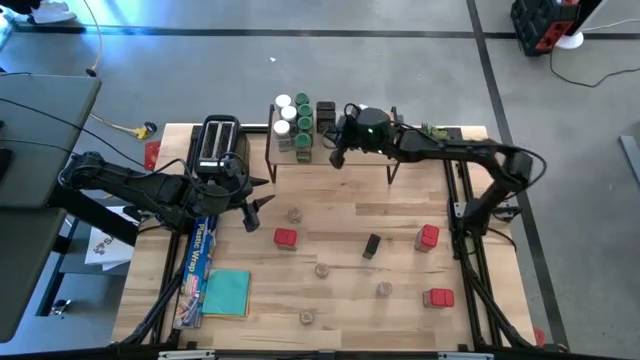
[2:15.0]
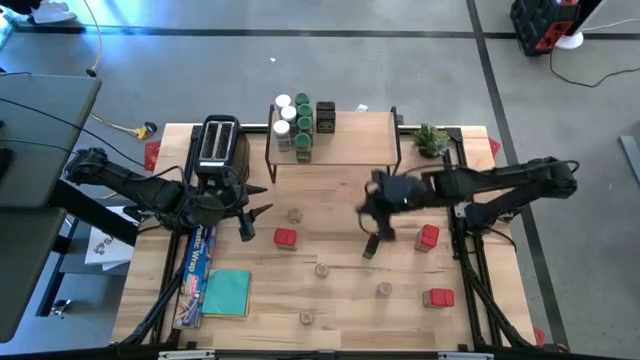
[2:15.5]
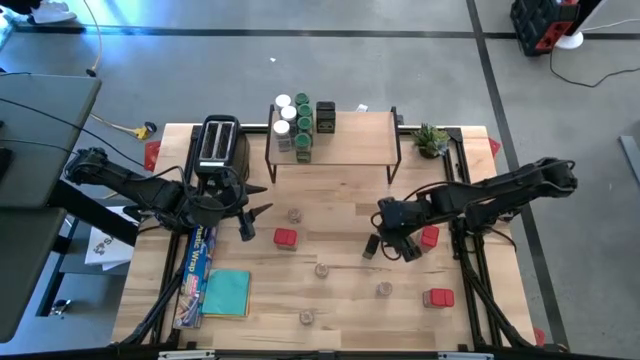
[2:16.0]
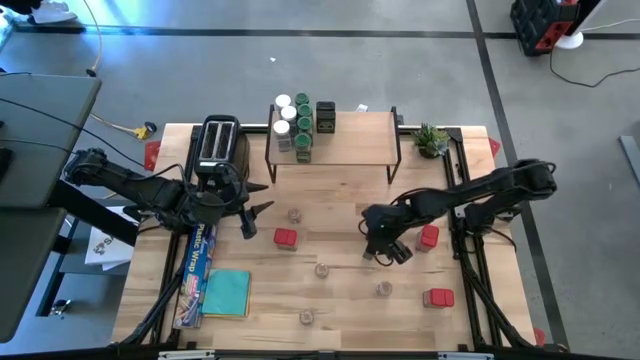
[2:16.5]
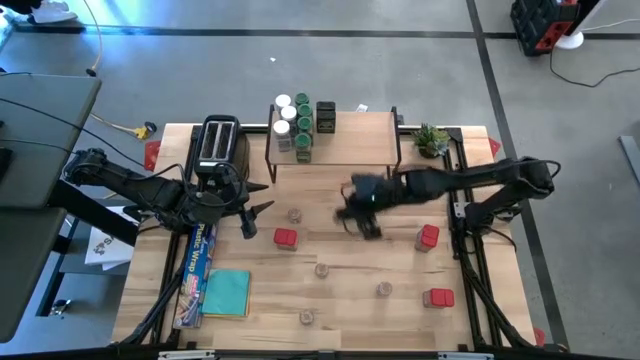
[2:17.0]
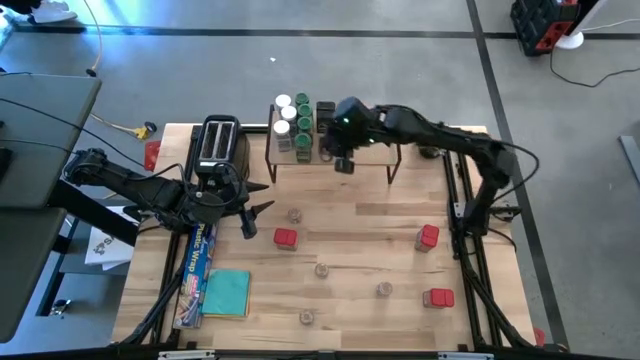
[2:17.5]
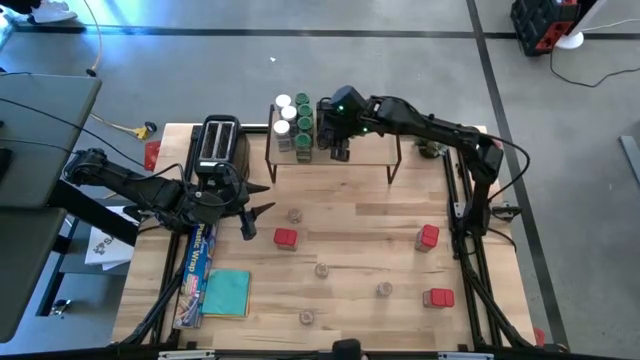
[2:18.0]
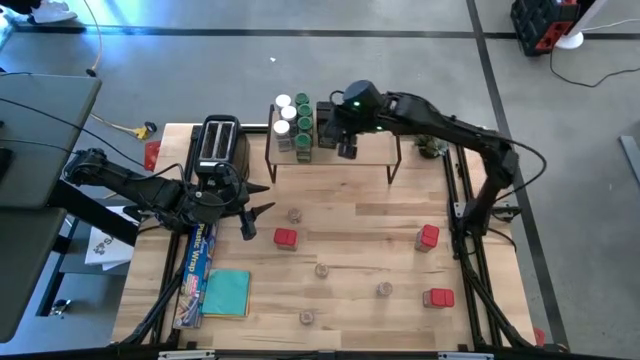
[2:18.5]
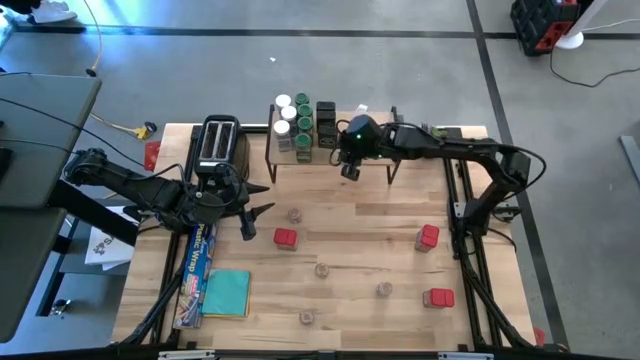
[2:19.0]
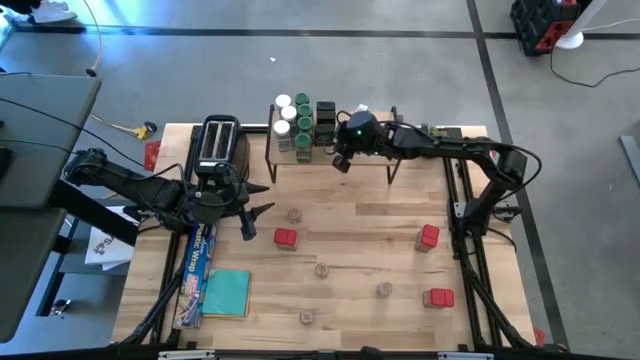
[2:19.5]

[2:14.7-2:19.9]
Task: Shelf spices
Put the black seasoning can on the shelf aligned with the other black seasoning can

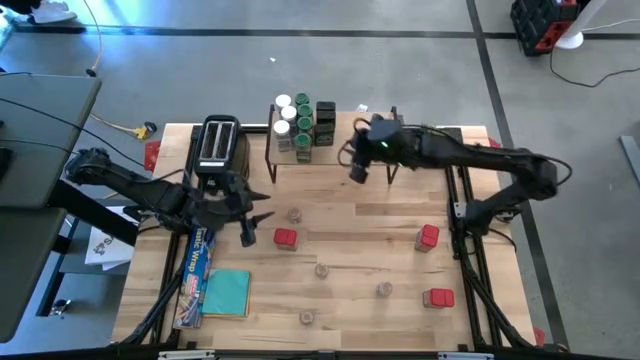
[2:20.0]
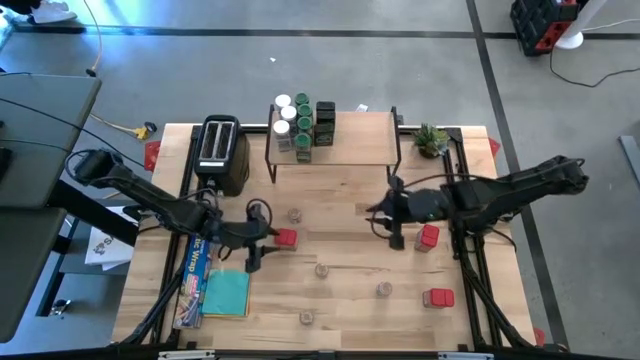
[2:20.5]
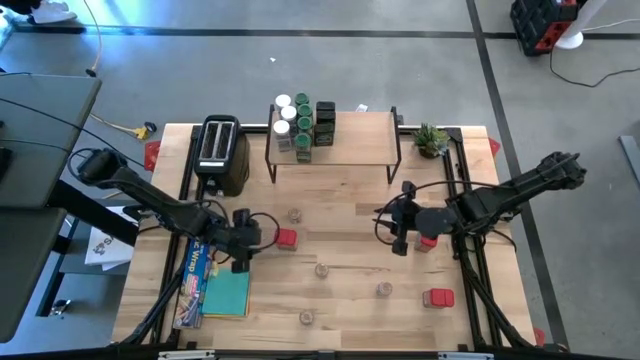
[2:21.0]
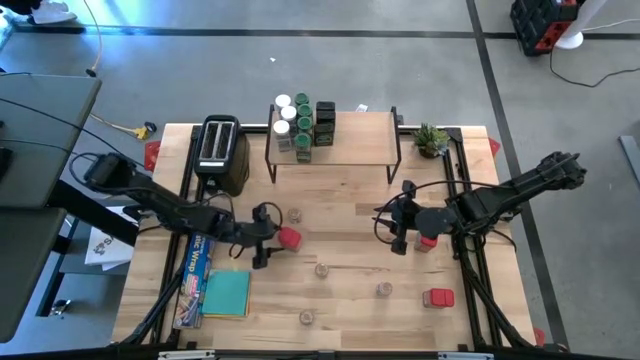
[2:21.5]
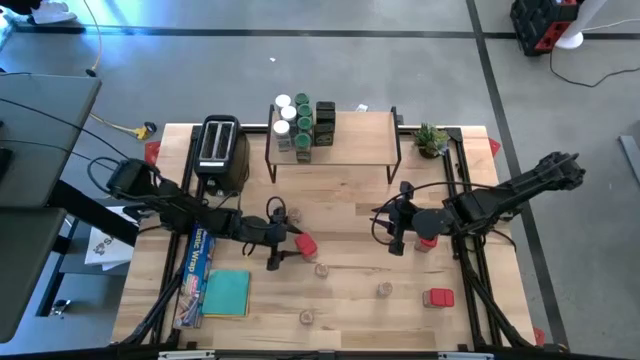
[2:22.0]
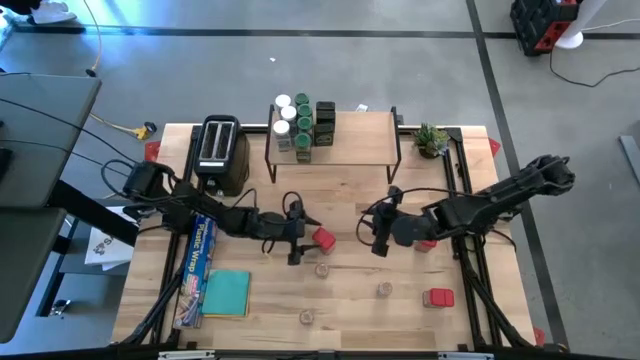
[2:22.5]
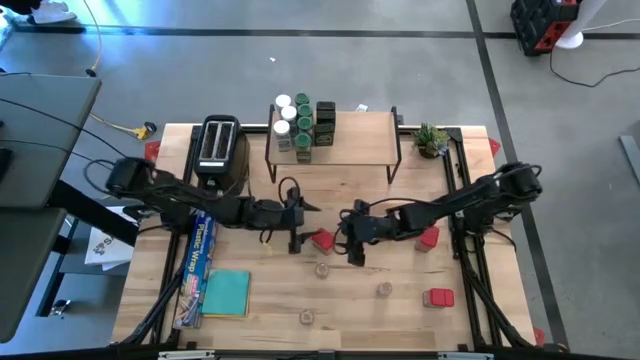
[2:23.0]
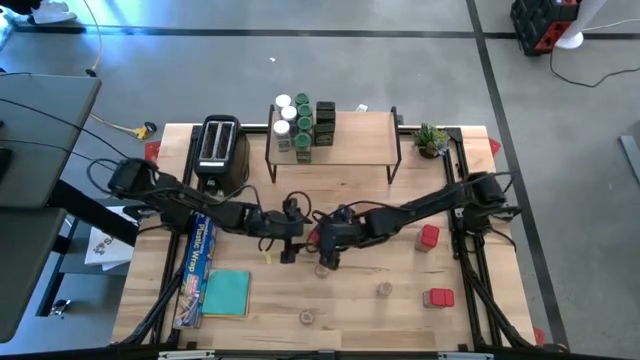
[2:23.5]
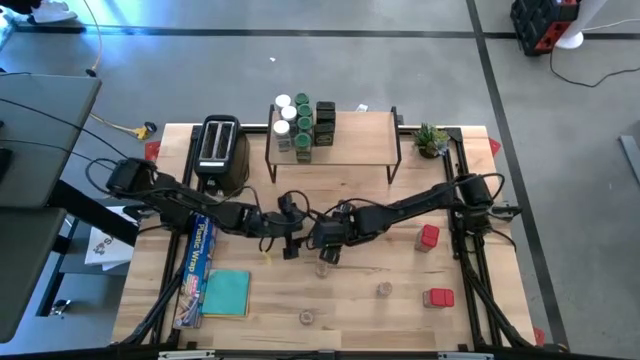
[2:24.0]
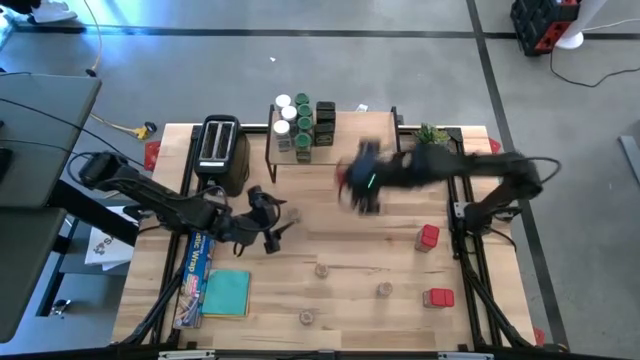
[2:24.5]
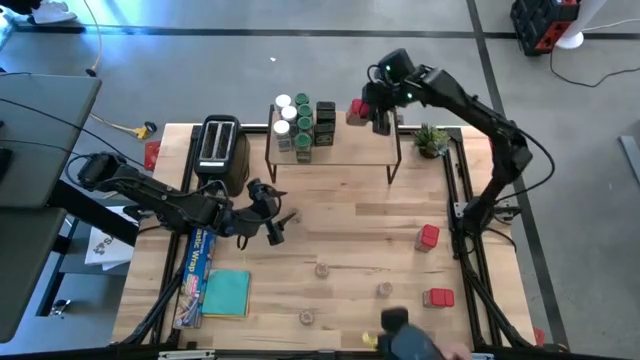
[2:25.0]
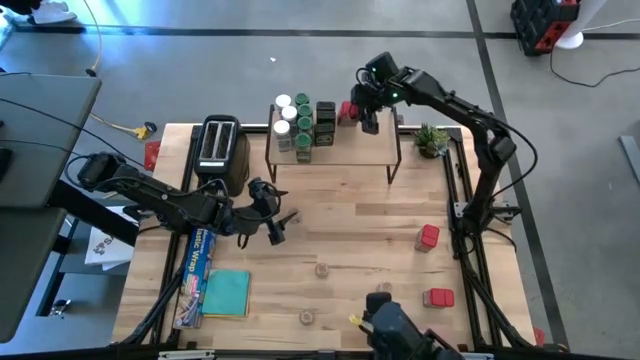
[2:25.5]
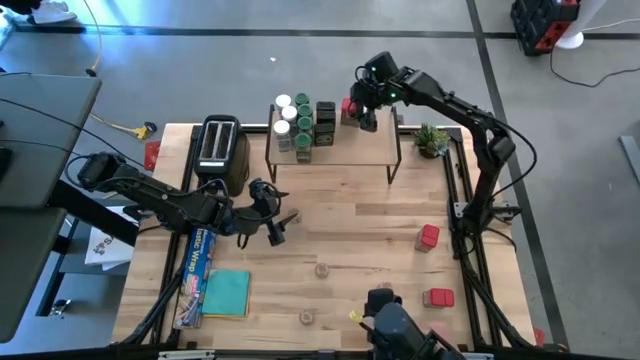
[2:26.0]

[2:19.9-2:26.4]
Put the left red seasoning can on the shelf

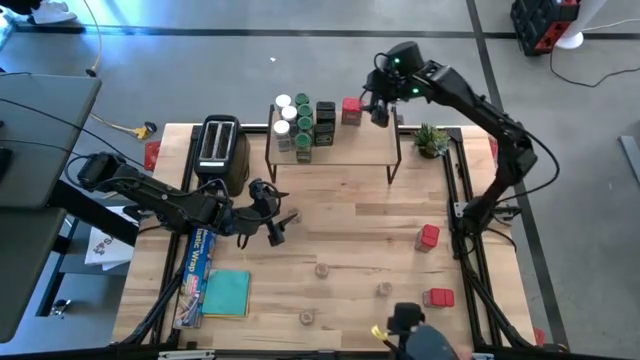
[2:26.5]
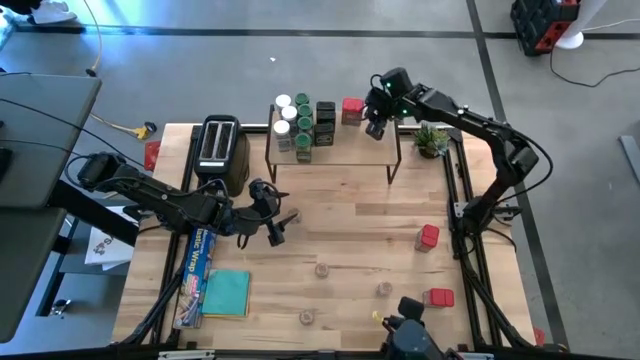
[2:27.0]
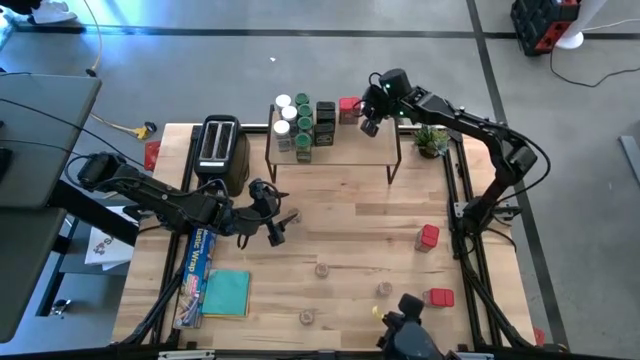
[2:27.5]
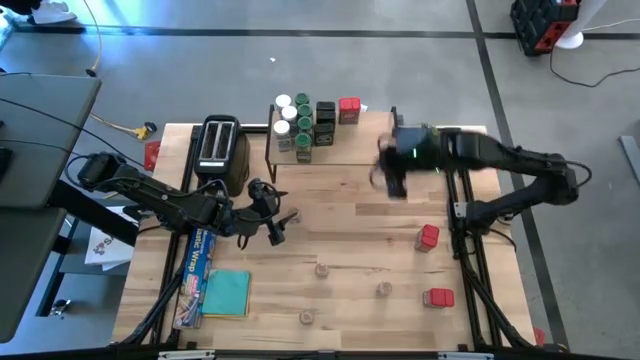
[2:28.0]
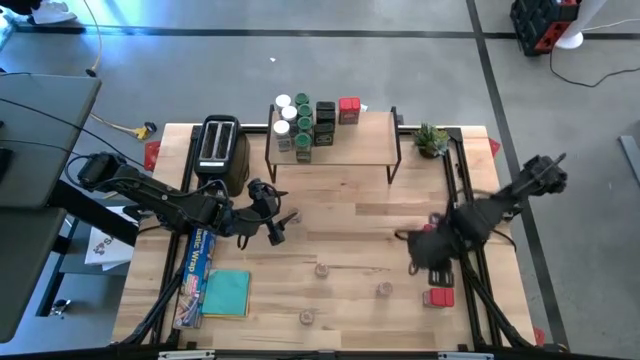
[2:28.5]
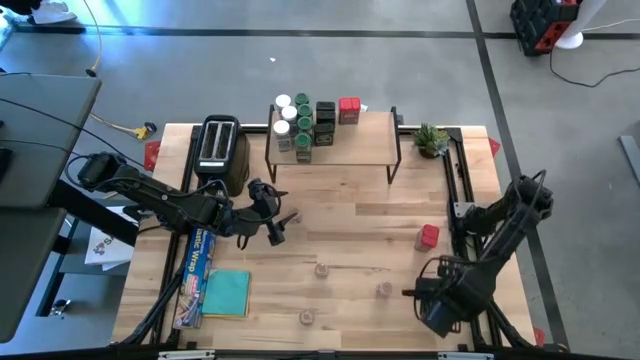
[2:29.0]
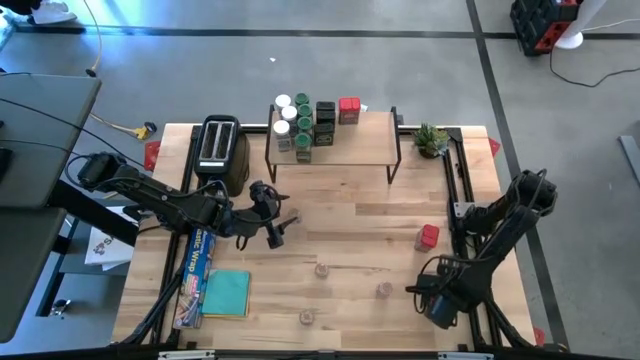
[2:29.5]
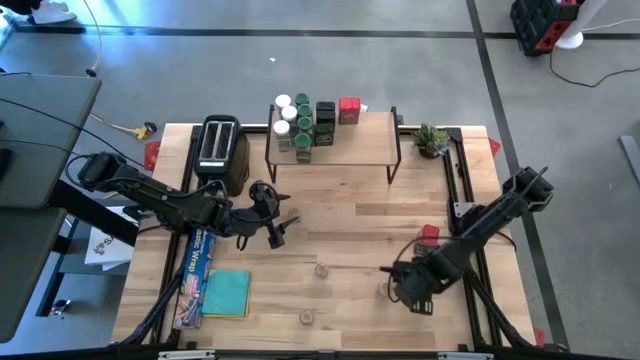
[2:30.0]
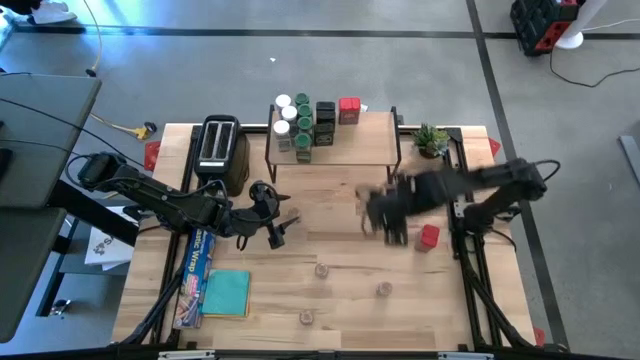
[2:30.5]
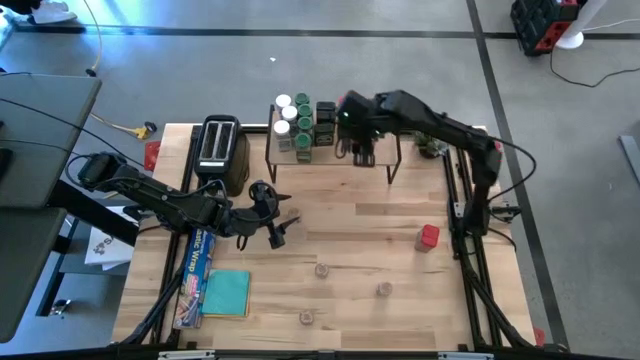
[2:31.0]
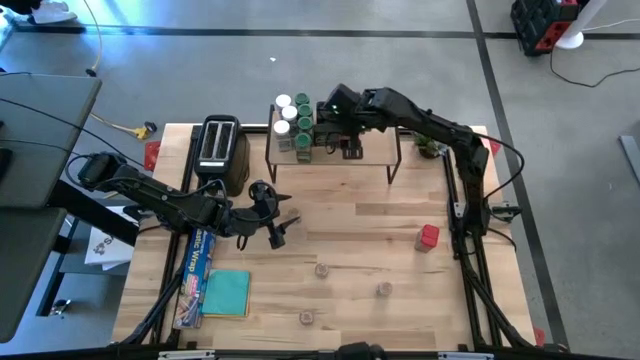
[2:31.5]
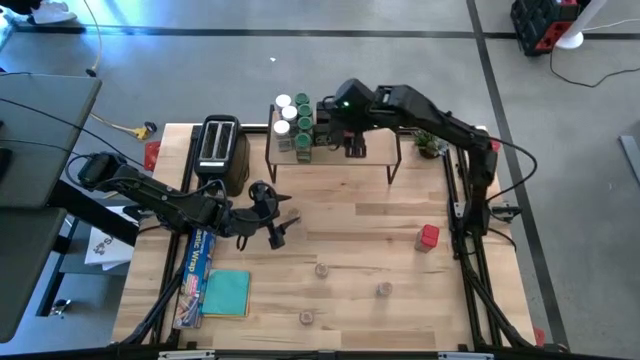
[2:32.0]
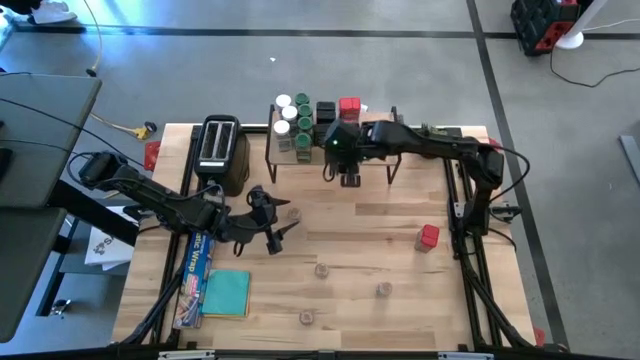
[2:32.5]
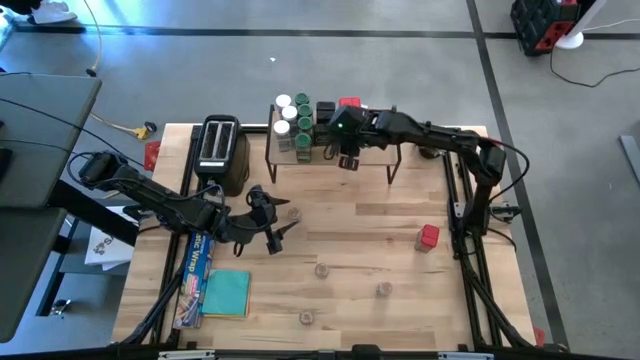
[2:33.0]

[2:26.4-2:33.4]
Put the bottom red seasoning can on the shelf aligned with the other red seasoning can

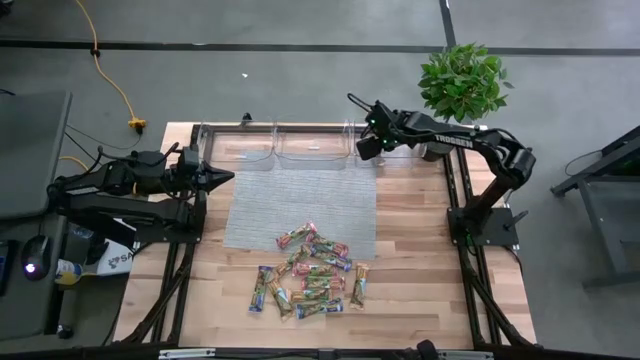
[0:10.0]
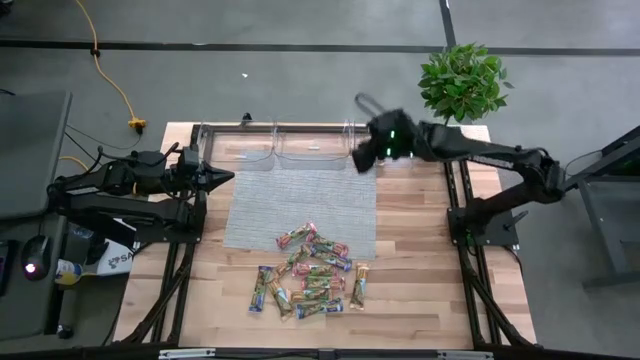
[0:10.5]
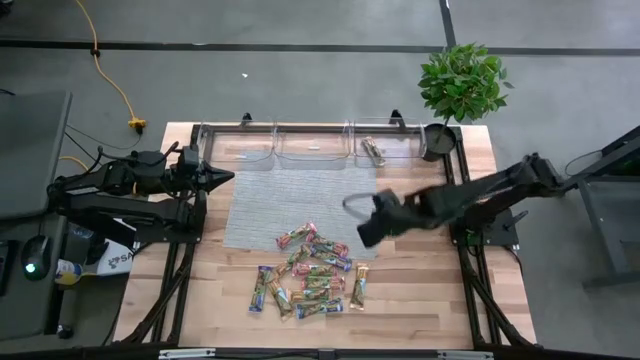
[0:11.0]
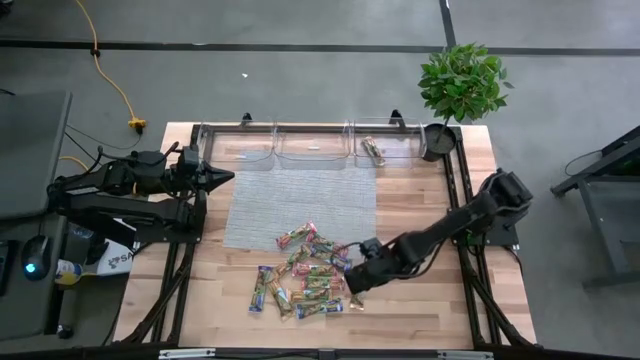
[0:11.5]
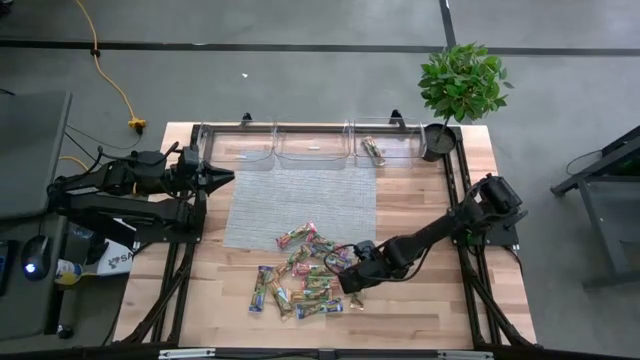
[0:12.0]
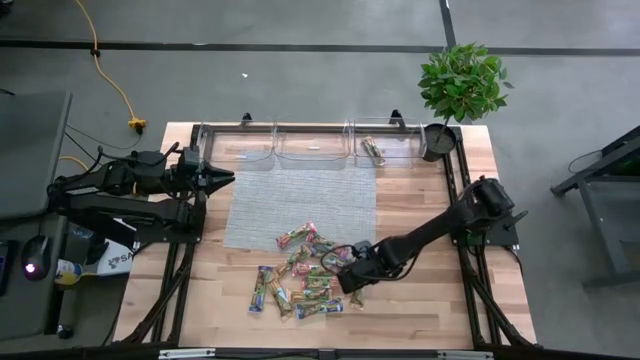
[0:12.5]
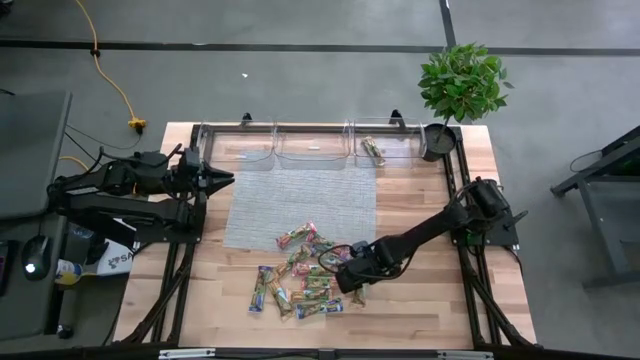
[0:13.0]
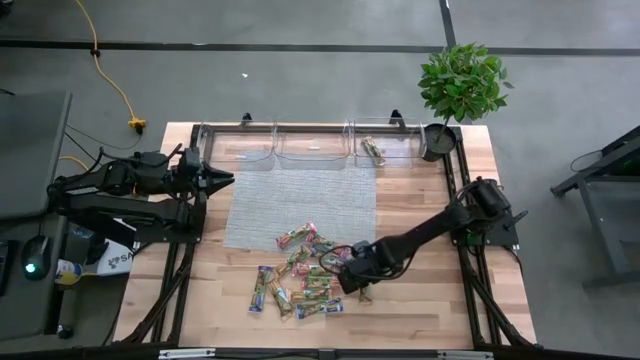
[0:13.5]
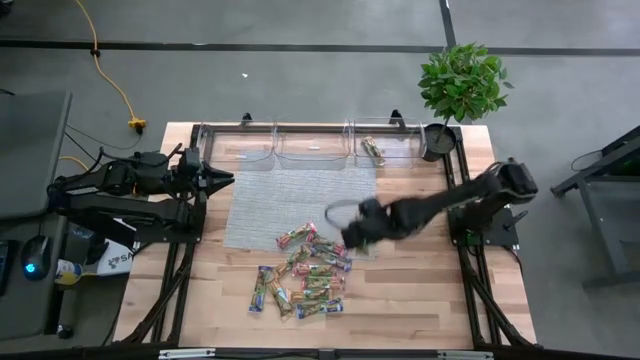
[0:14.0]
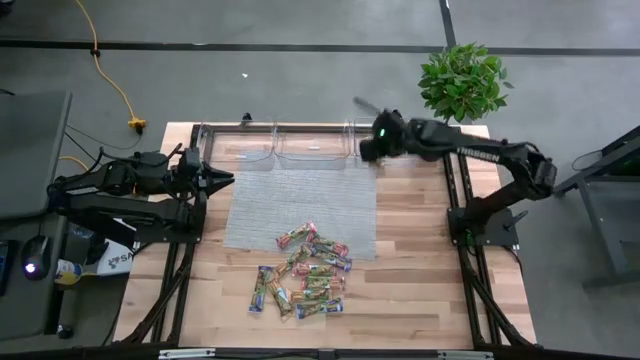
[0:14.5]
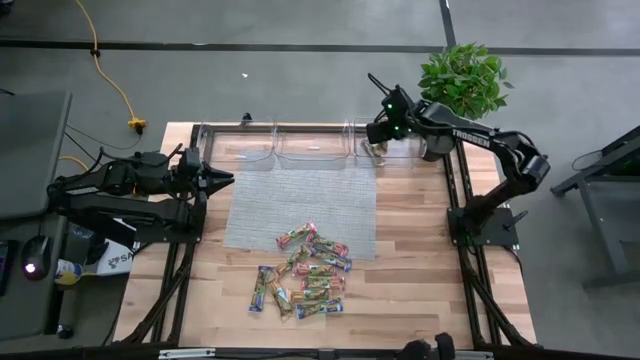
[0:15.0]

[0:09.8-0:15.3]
Task: Pick and place Granola Bars by type
Put the yellow granola bar into the right transparent bin
